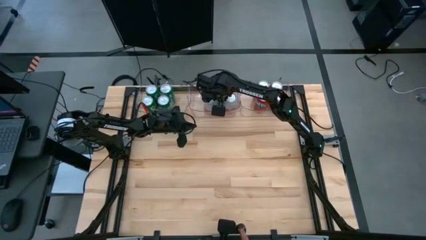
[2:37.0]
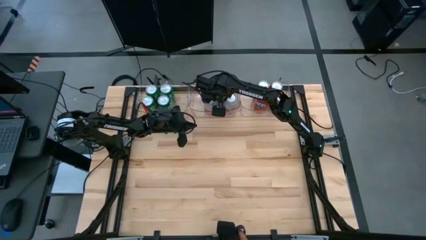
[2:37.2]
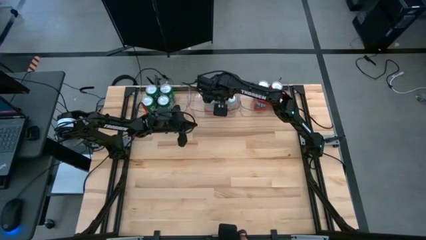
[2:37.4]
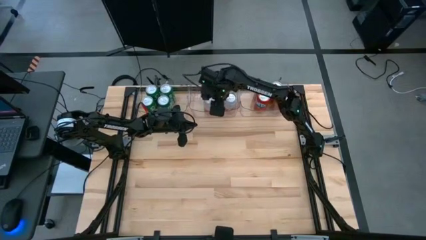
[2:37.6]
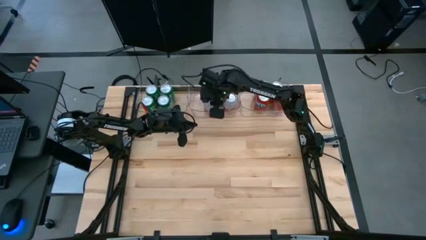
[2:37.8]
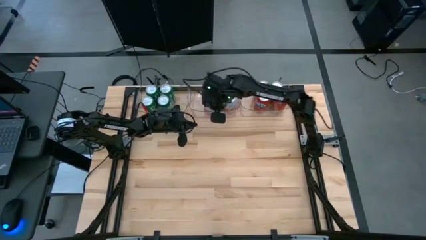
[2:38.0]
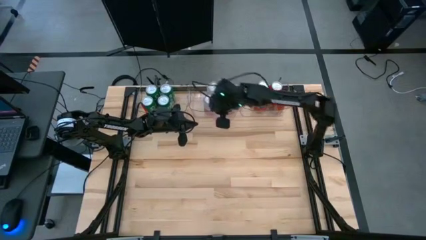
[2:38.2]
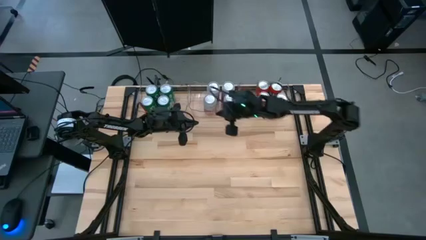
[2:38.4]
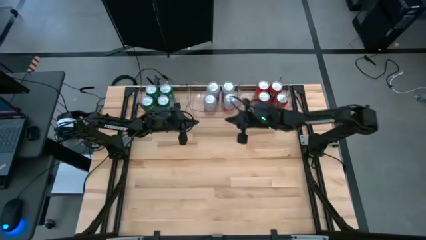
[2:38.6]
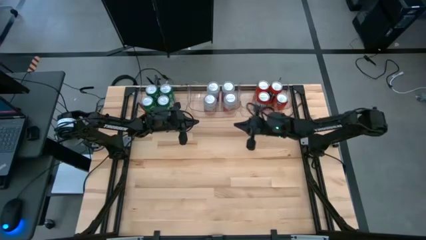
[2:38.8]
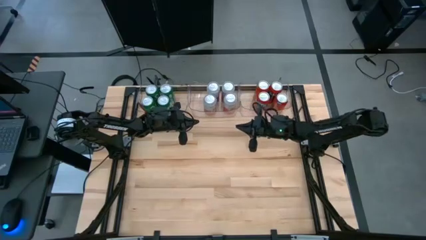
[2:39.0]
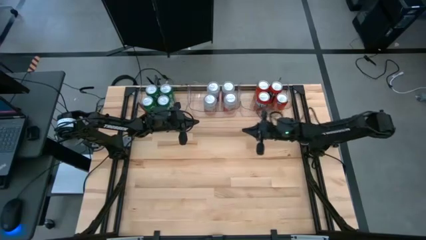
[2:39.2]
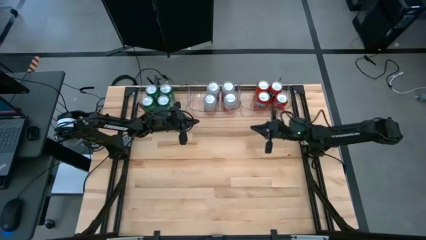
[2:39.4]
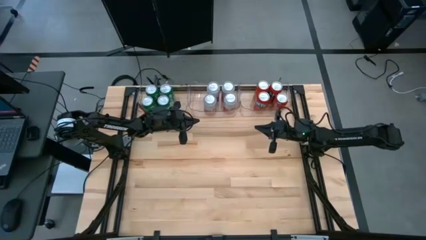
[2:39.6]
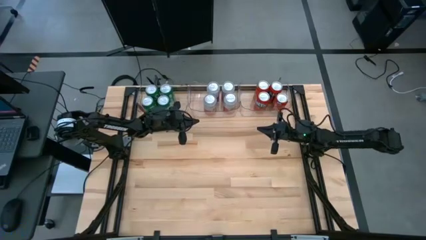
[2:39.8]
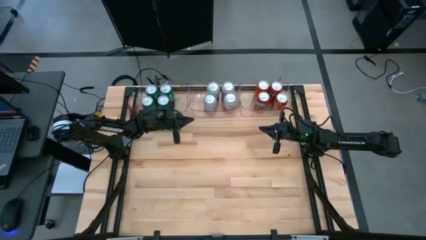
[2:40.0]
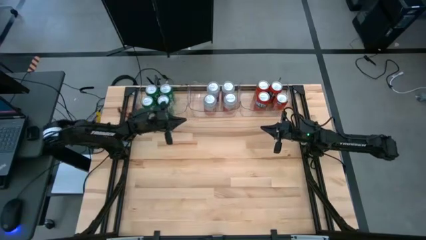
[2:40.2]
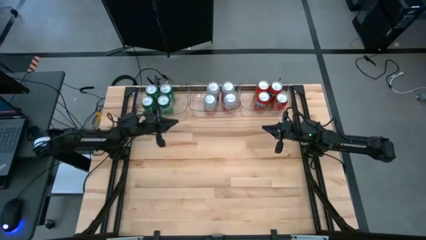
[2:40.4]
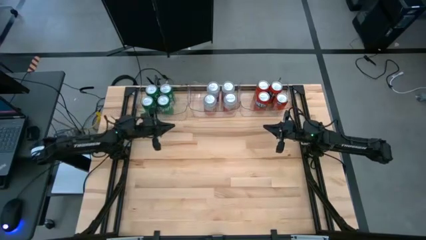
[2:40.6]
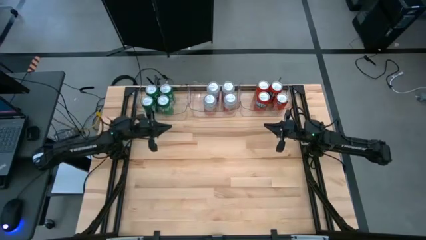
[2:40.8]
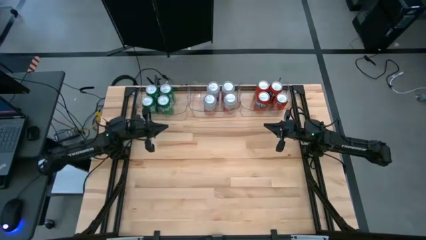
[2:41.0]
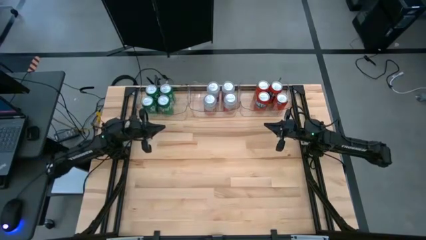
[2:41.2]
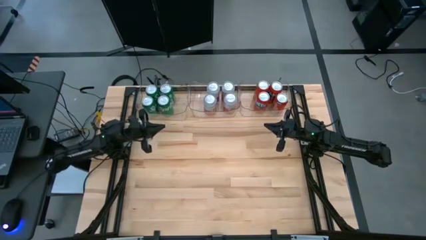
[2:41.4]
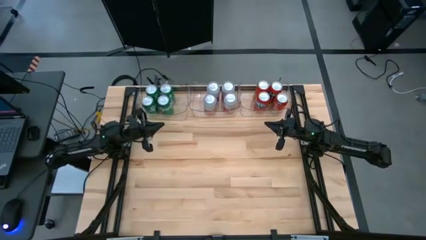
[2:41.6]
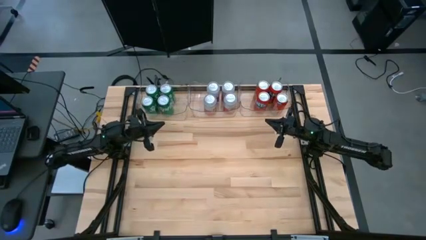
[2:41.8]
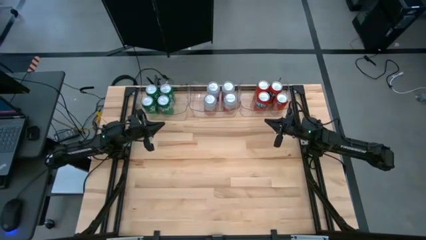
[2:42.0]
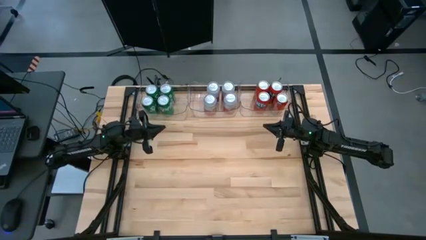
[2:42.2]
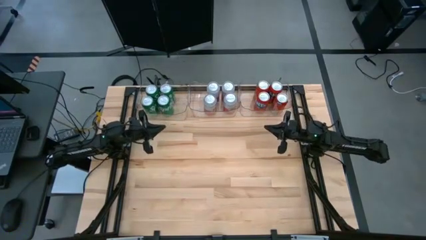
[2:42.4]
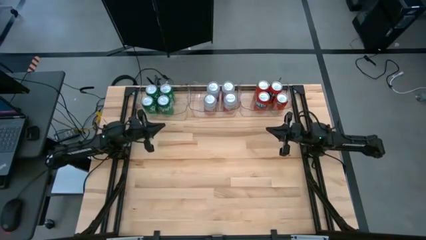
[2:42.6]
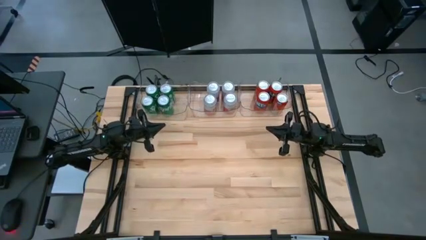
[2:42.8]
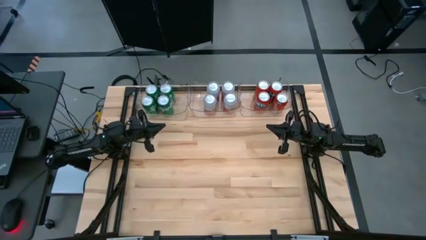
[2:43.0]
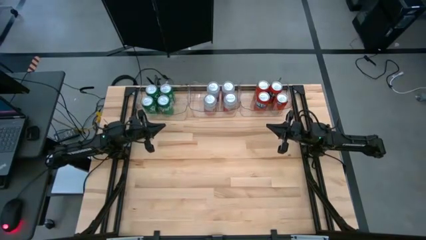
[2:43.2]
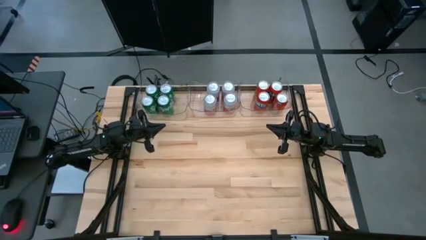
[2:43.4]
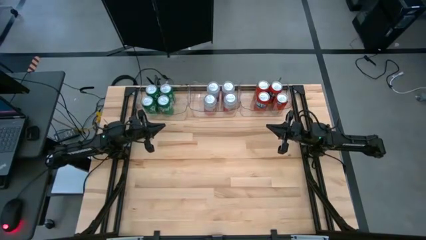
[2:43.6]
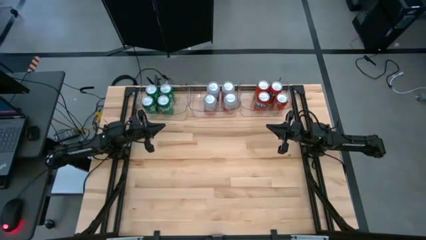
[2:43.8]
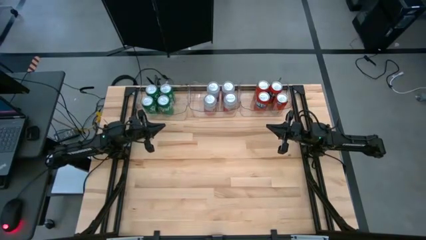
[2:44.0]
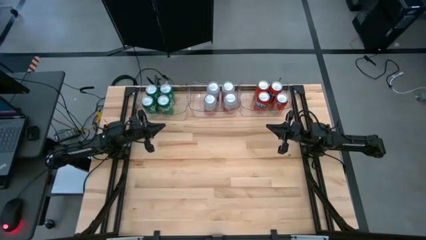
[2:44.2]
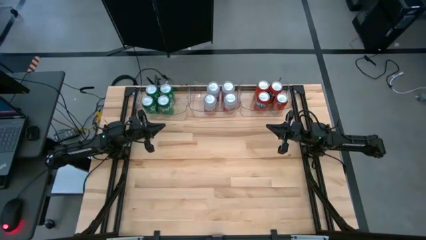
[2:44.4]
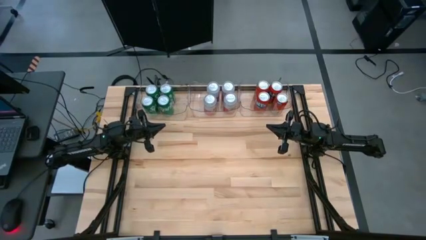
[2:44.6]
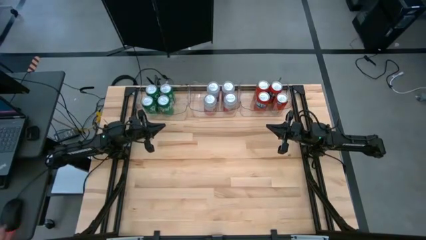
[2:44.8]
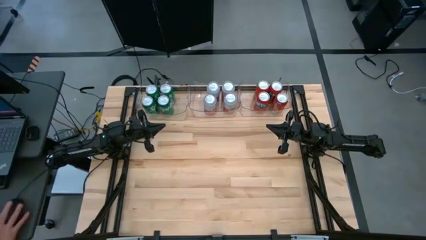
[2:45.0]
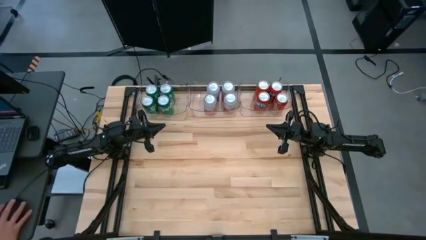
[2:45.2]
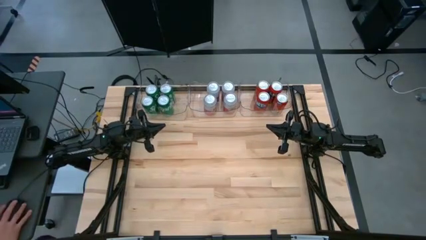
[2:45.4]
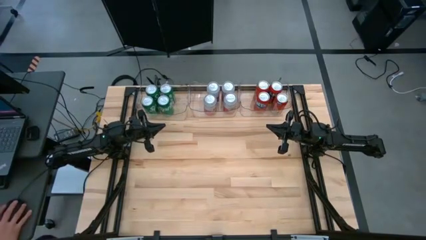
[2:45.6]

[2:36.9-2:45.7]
Task: Sort soda cans
Return to Home Position

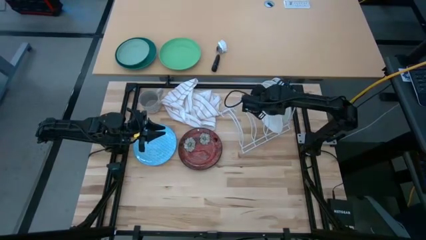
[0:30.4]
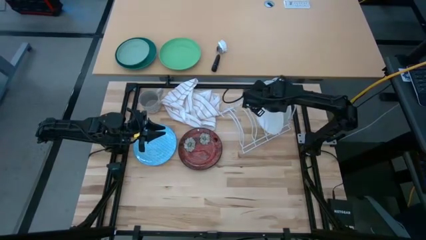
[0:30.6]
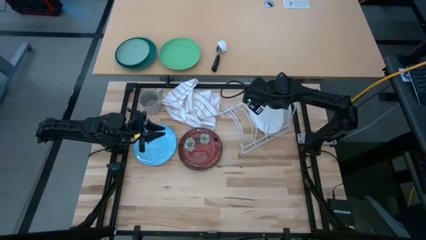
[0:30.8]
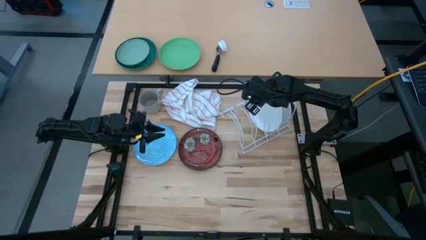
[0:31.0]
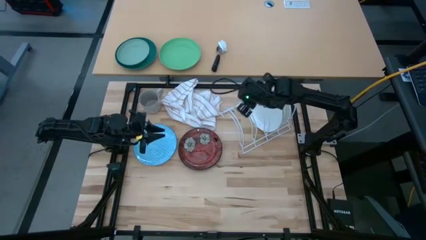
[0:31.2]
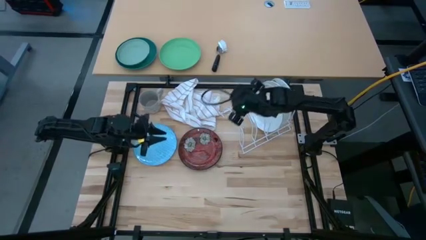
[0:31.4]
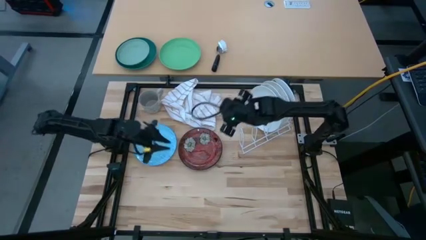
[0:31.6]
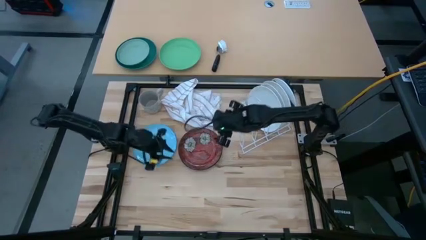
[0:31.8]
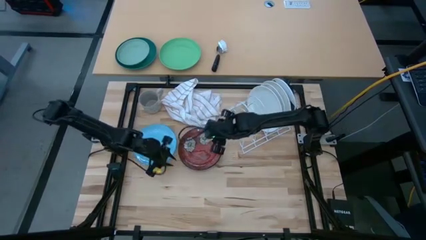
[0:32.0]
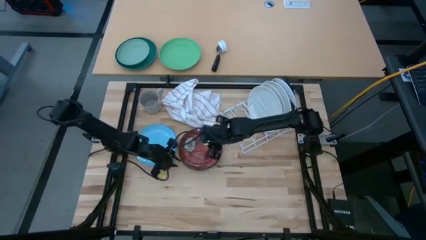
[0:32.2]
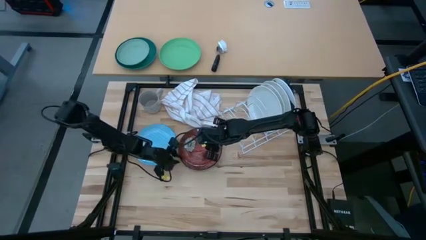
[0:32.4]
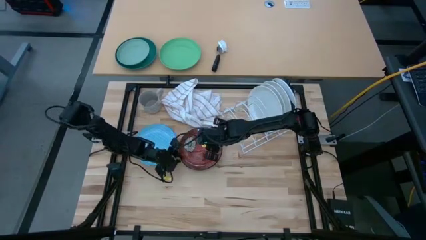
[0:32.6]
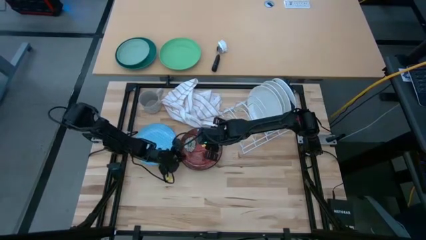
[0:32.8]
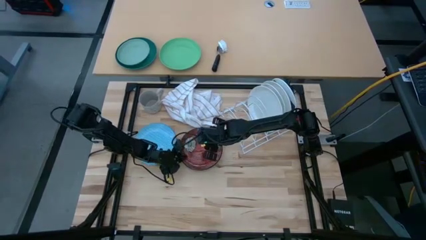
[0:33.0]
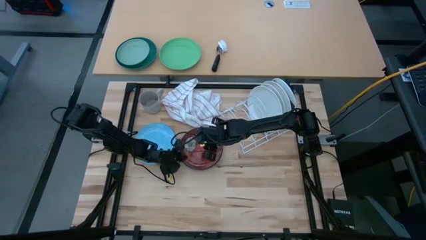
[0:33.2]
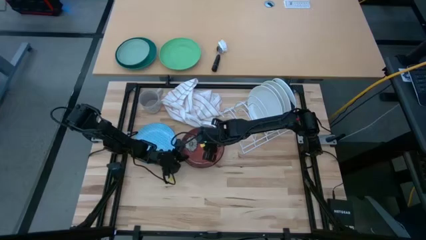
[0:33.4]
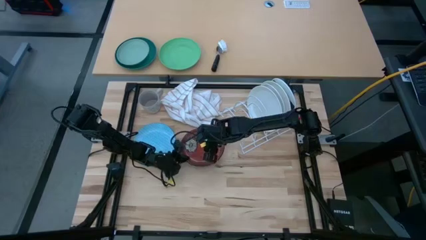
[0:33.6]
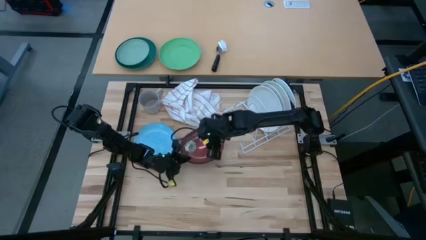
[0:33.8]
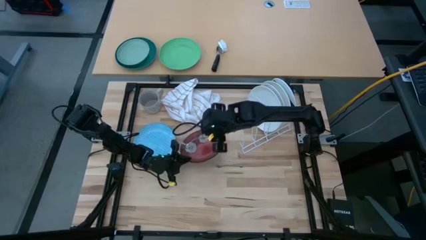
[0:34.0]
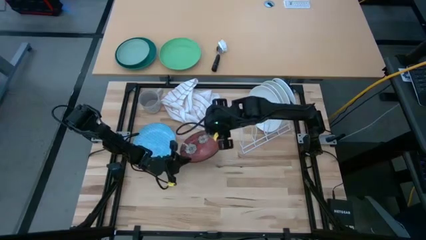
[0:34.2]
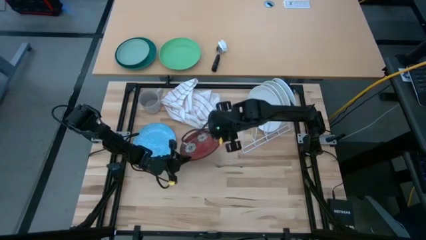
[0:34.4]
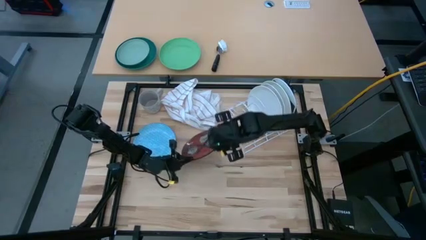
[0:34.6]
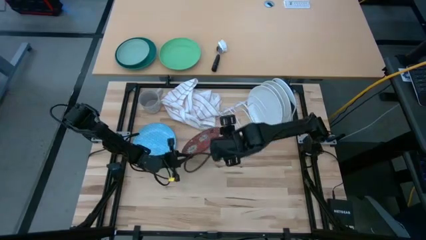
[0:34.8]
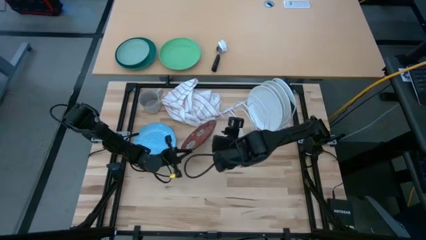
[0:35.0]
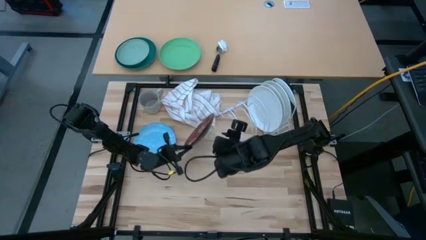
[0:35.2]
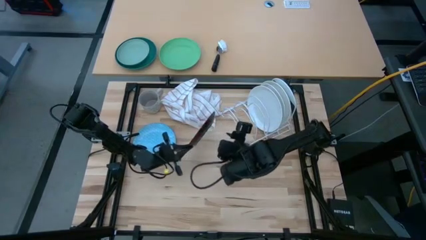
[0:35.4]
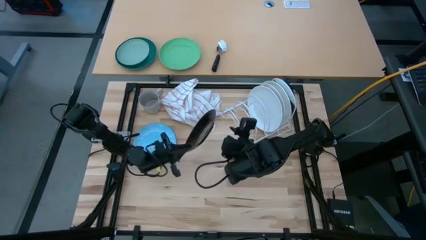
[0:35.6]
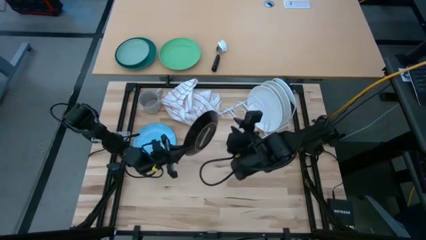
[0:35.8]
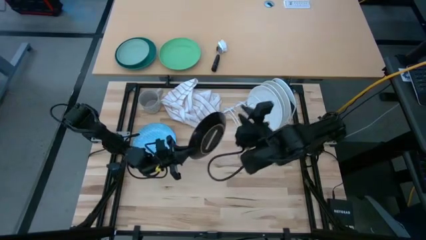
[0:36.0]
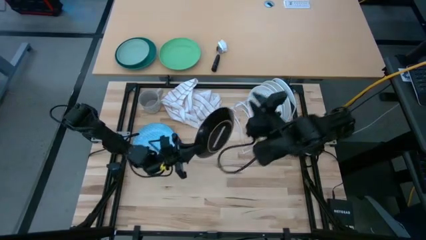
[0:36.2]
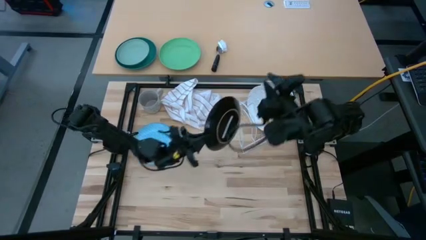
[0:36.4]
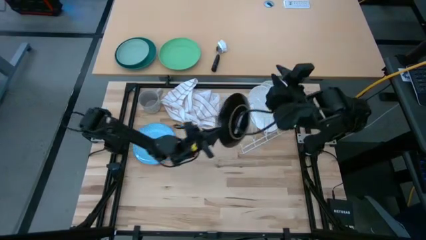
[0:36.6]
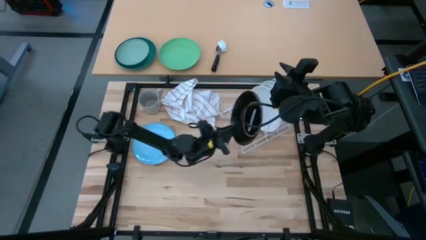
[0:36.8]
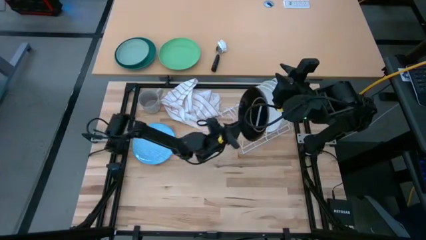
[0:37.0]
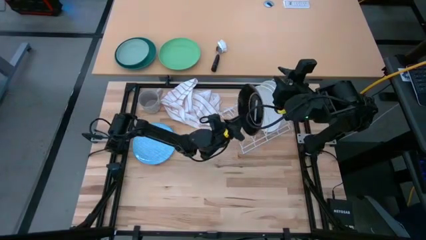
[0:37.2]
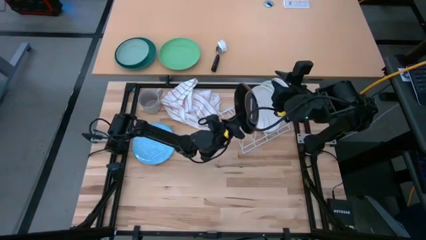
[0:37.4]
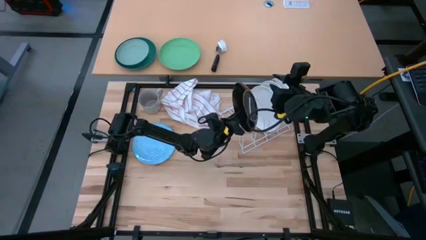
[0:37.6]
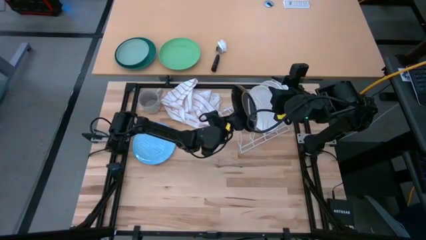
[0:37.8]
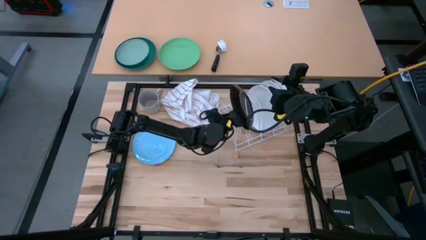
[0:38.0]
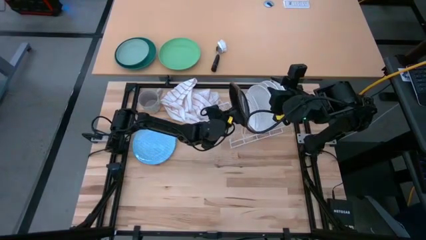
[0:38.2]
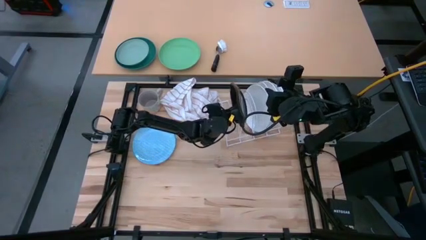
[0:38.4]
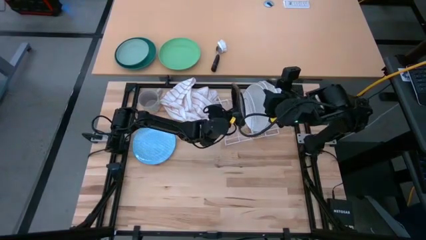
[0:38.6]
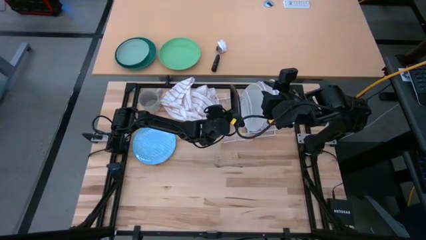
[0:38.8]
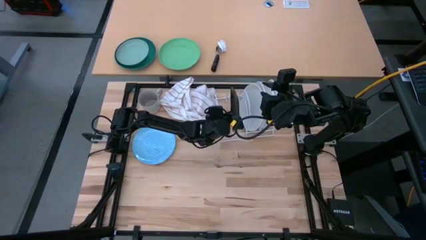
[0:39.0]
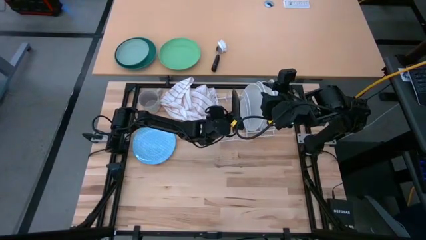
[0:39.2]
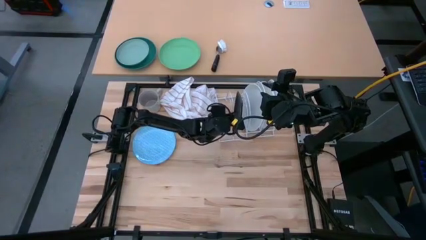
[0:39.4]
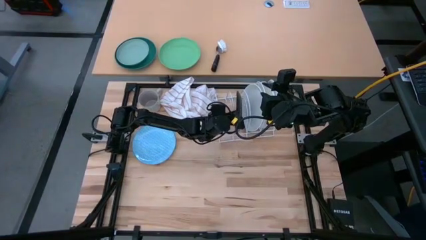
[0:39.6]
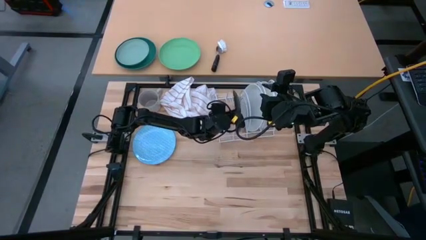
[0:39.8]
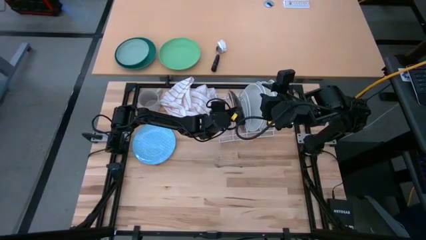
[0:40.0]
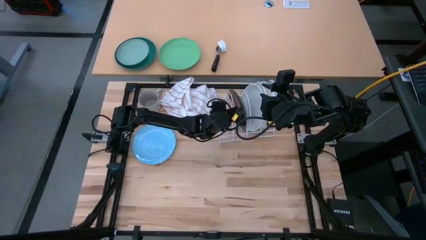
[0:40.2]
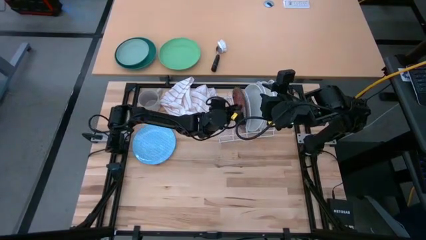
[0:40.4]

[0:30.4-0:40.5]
Task: Sort dishes
Put the brown plate into the white dish rack
